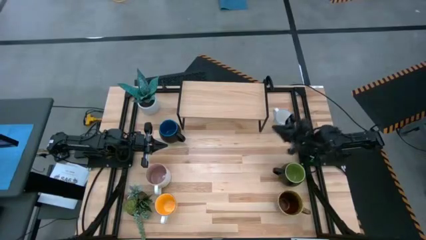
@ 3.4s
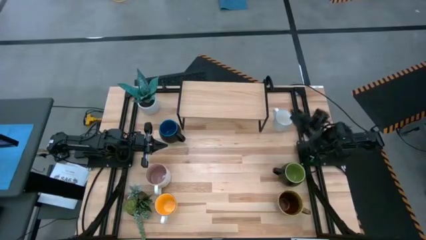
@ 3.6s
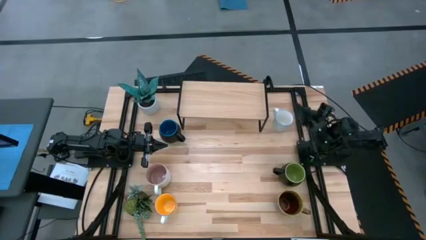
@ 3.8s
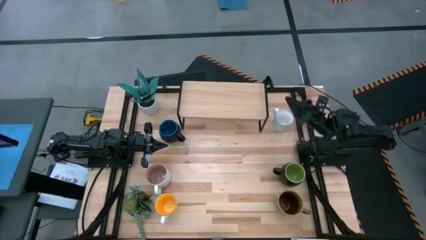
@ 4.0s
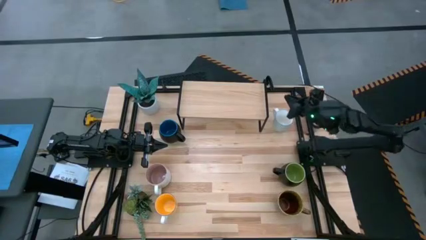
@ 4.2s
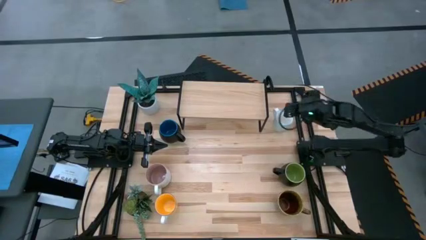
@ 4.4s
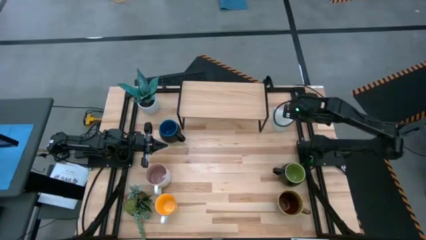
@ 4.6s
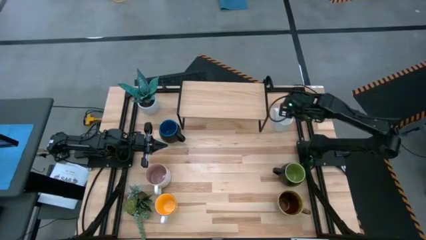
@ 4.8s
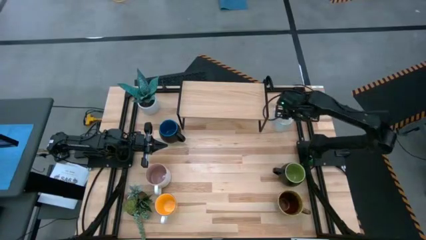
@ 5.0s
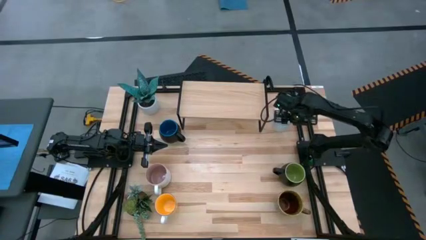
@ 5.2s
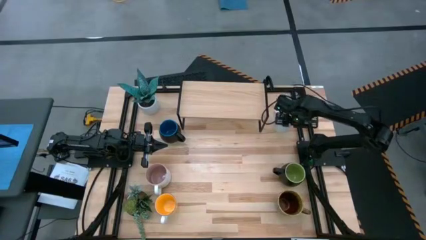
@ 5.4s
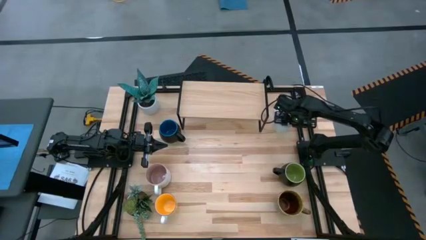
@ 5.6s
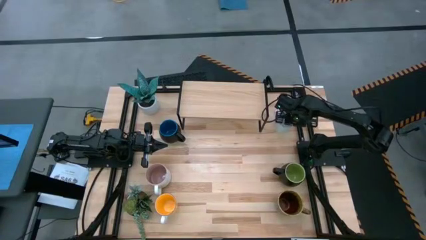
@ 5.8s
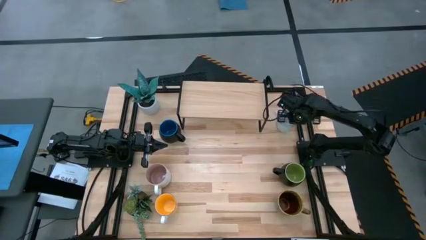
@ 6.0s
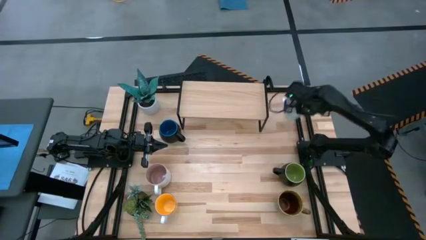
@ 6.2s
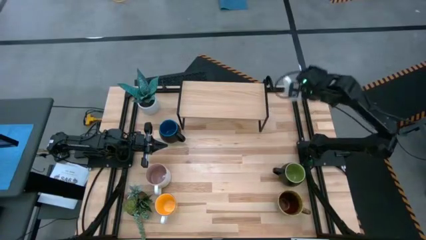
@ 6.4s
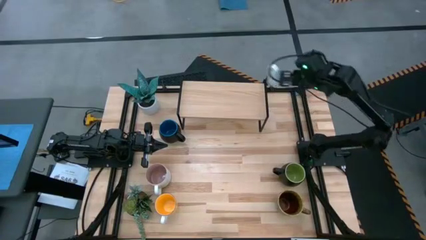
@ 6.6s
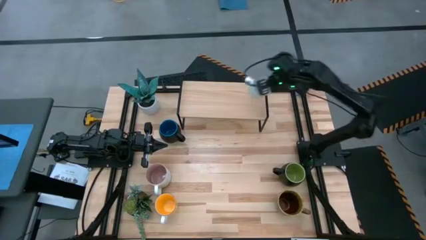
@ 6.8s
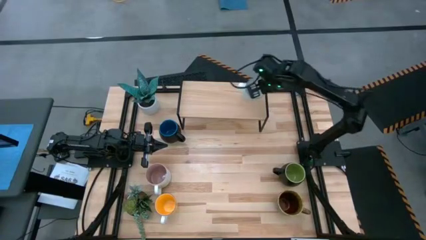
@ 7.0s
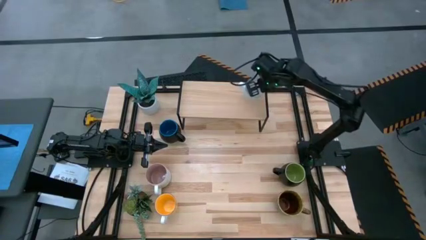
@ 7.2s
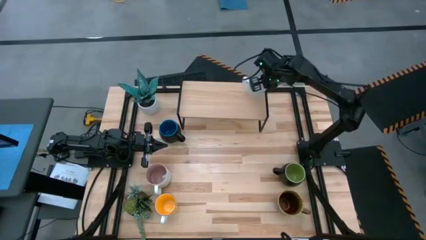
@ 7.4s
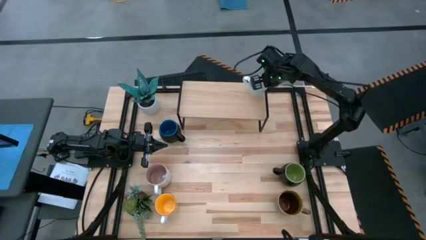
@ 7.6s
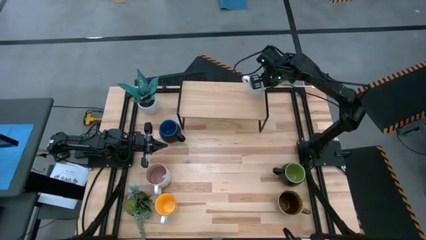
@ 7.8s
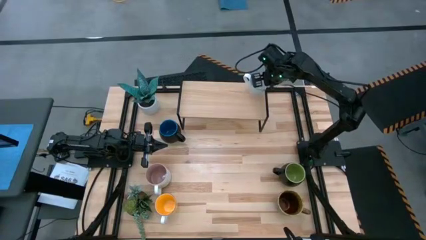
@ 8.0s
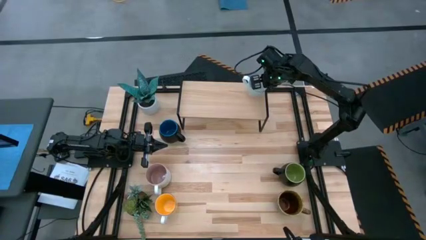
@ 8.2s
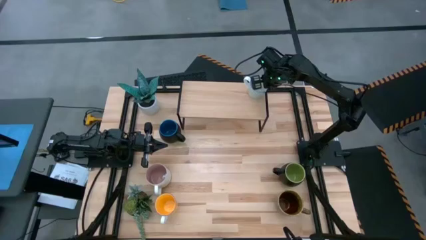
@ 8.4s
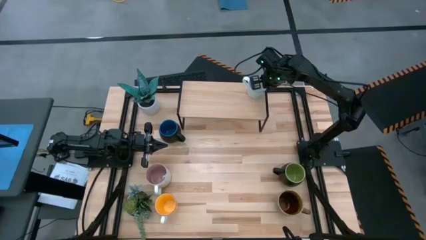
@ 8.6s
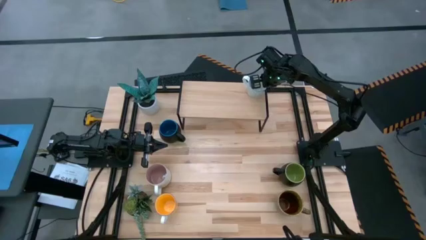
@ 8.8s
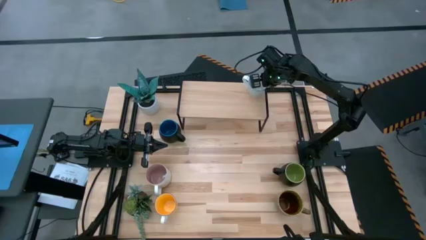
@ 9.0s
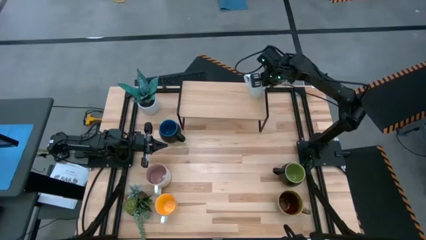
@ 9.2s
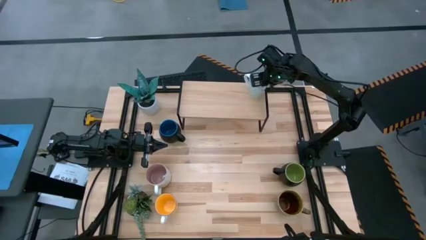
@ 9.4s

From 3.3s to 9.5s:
Task: Place coffee mugs
Put the white-blue interior mug on the shelf

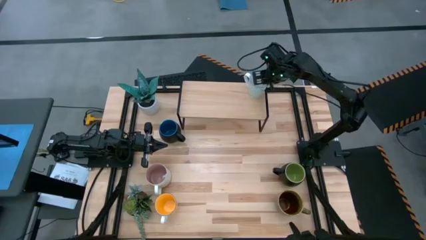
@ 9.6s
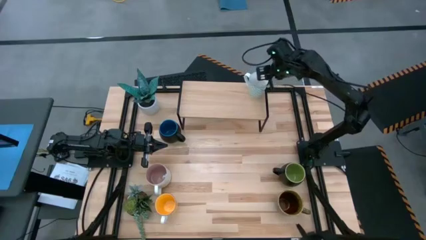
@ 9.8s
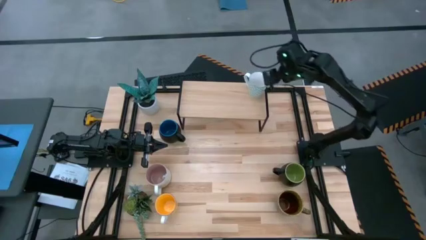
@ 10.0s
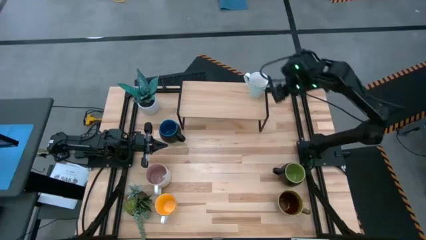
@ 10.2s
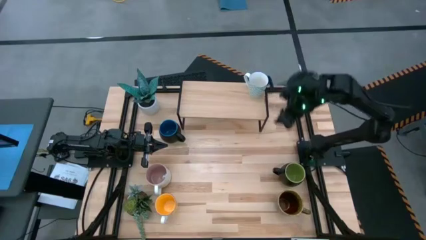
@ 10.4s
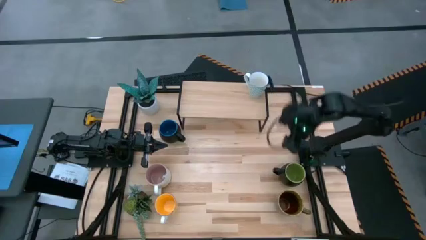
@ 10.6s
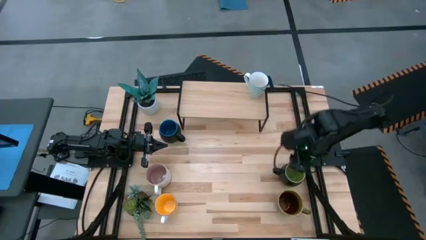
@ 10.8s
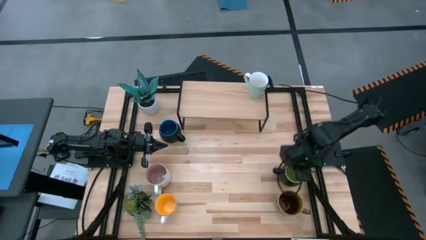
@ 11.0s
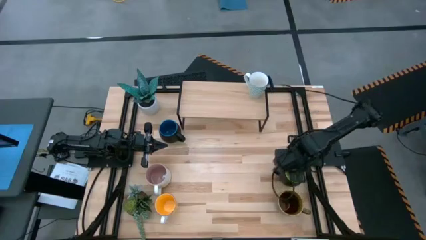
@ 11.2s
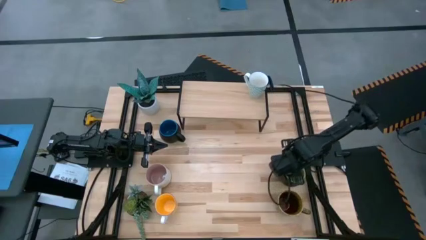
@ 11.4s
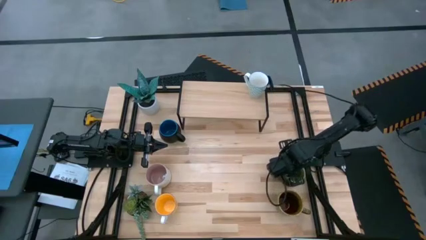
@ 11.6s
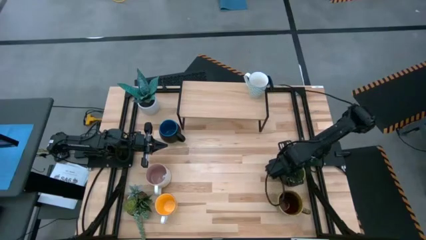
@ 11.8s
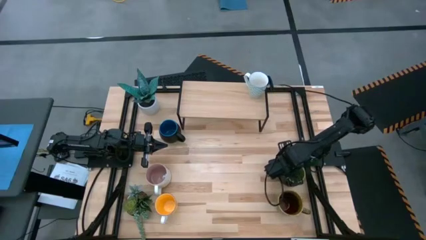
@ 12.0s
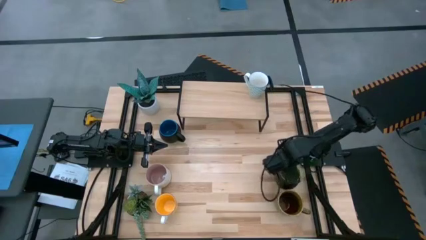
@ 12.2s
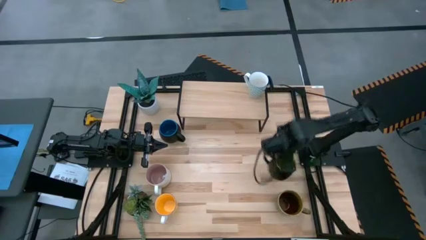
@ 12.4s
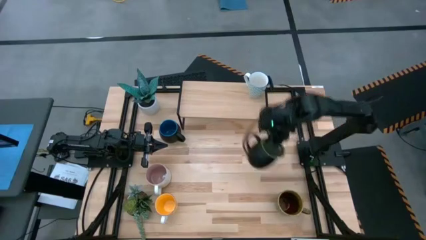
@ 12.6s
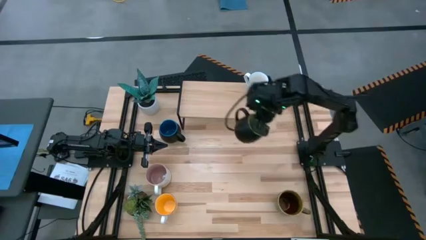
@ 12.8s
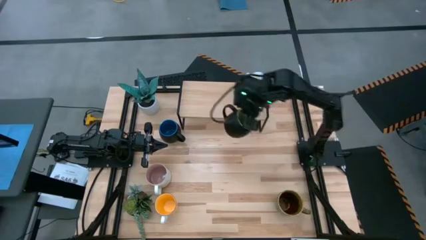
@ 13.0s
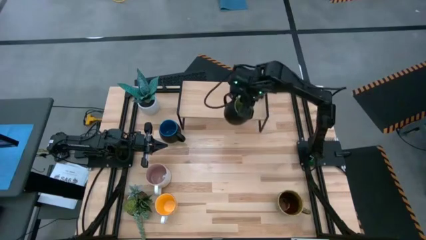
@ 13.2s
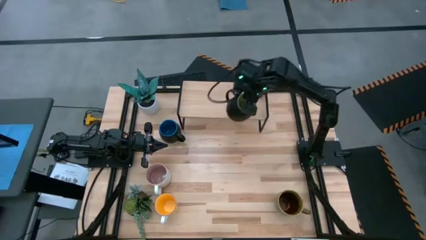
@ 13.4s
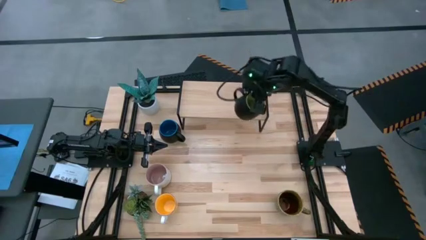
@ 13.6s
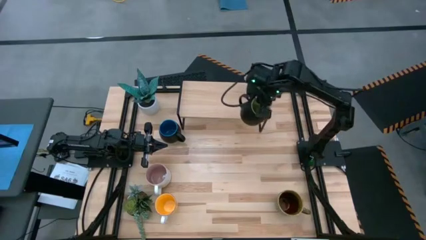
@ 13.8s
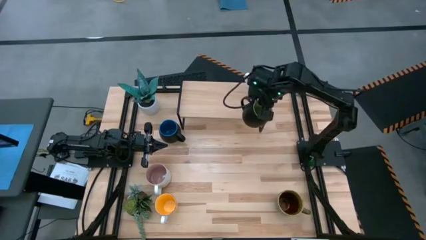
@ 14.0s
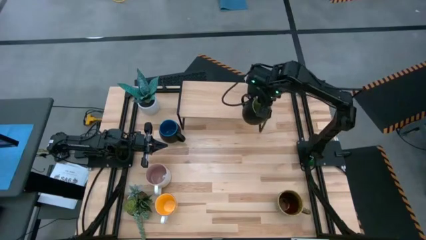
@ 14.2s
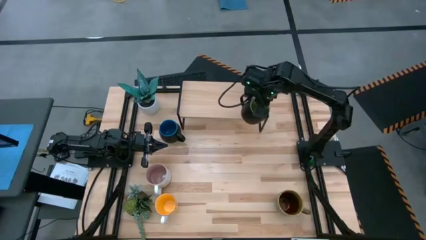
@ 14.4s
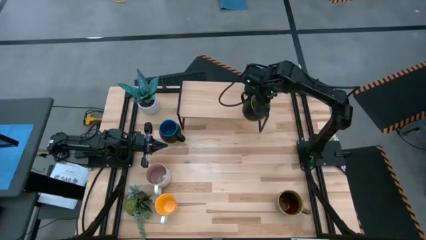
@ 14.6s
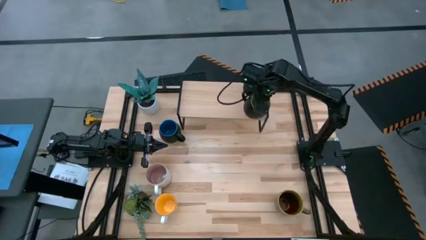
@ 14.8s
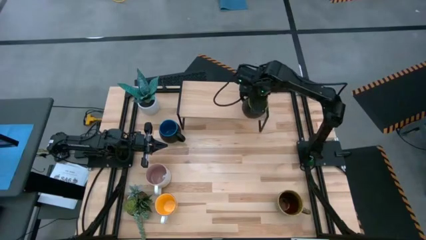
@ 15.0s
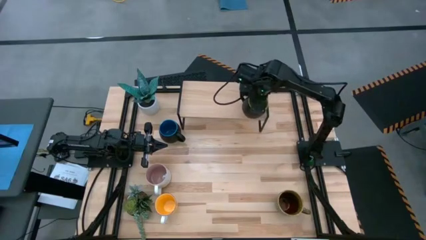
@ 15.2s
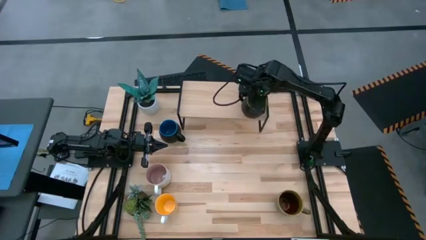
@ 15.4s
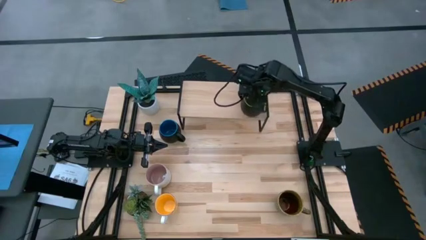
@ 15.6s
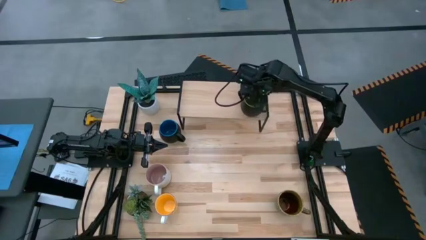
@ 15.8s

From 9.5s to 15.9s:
Put the black-green interior mug on the shelf

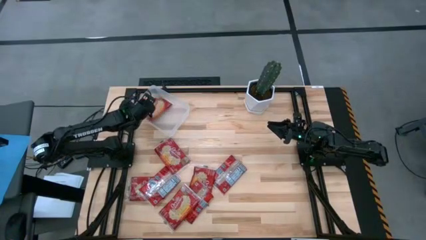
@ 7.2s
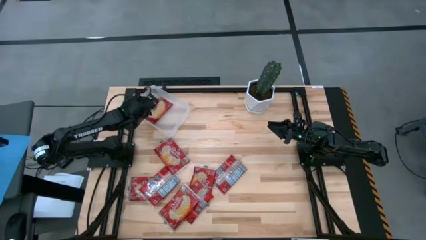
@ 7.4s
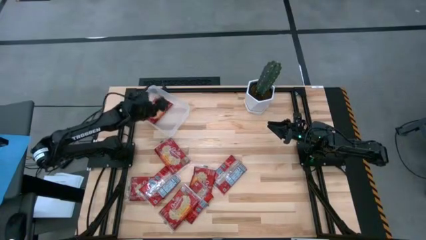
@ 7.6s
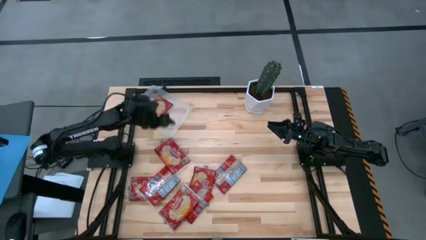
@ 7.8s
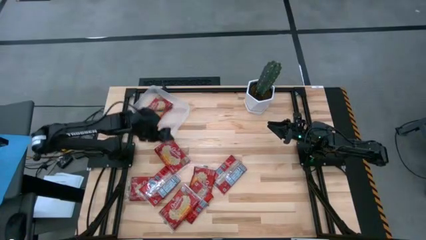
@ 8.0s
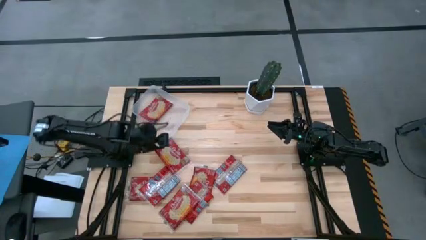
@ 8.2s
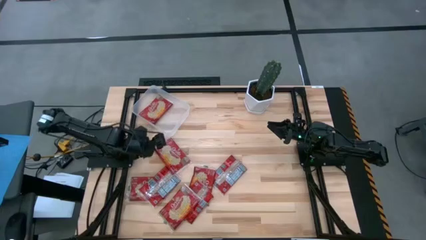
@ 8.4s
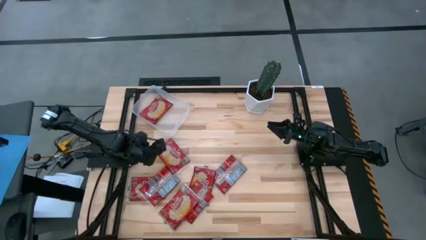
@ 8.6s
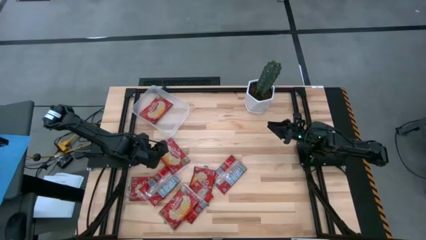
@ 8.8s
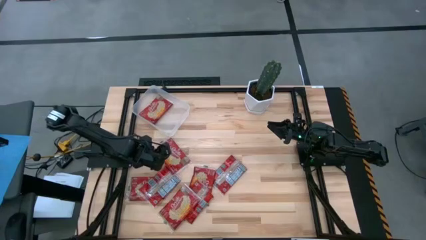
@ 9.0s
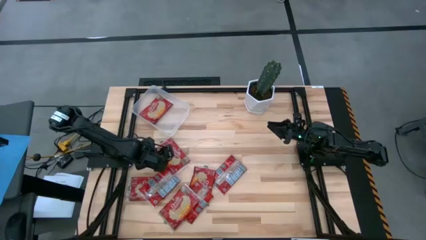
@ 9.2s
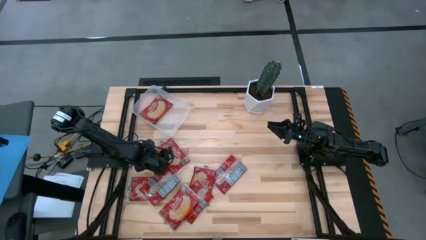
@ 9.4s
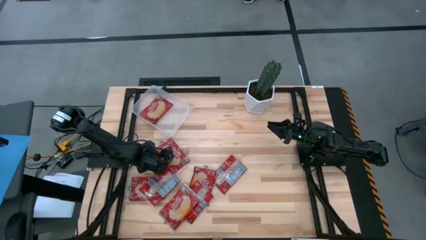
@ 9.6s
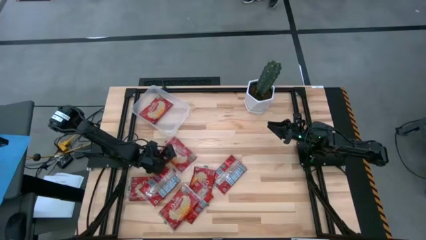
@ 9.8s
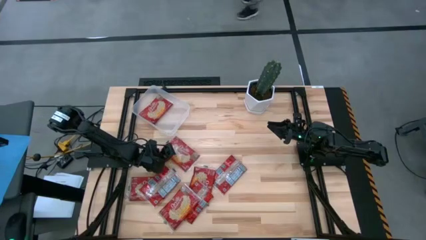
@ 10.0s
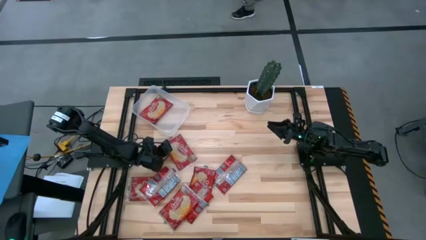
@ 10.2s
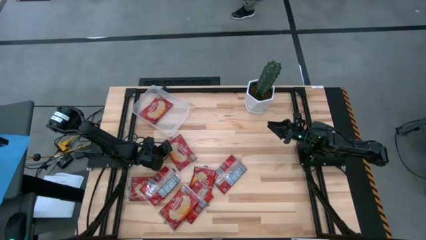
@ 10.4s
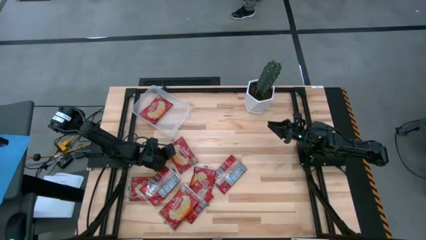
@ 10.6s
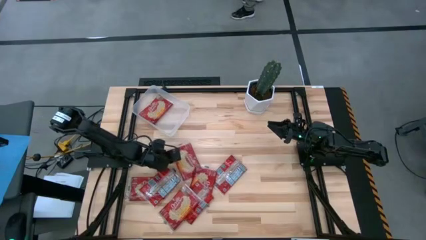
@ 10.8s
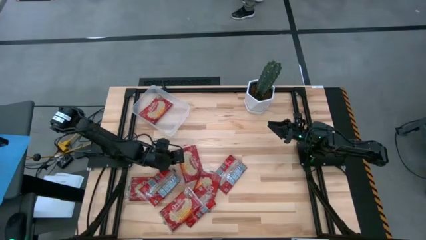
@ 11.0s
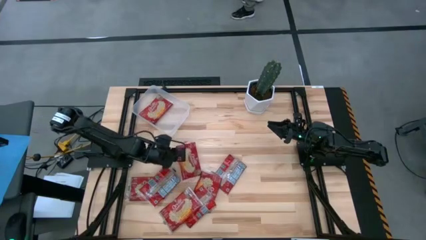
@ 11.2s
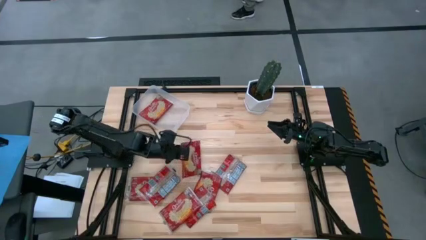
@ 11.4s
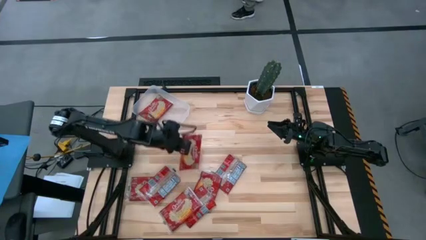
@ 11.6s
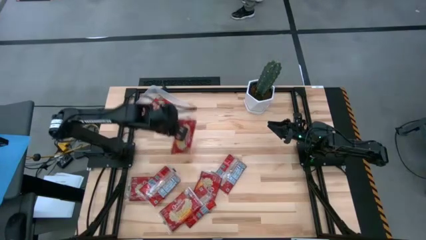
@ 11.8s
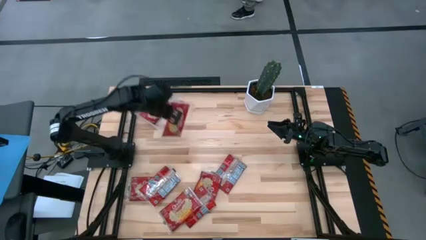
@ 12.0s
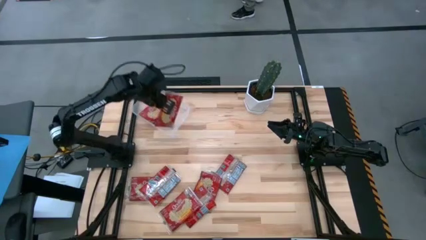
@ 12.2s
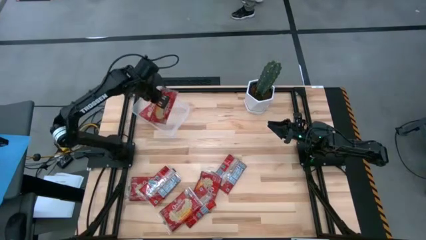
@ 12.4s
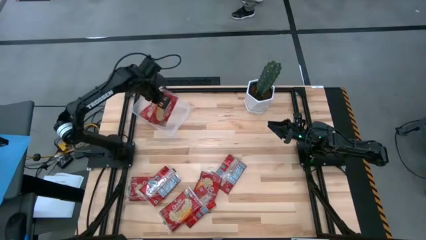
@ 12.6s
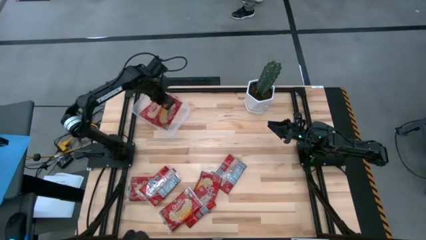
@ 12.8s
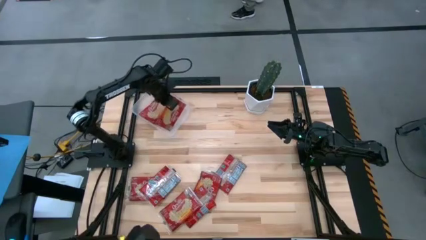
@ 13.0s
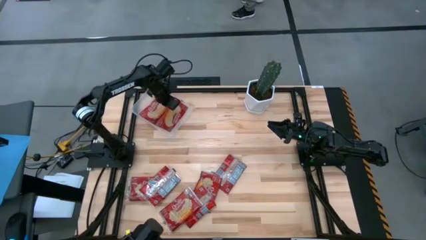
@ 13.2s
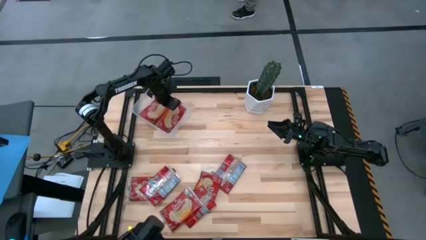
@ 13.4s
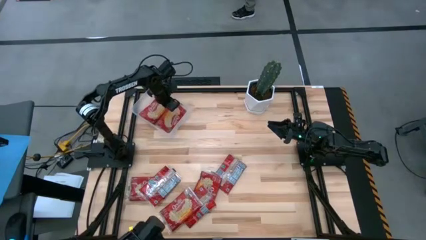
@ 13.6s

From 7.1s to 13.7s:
Task: Sort popcorn bags into baskets
Put the red popcorn bag into the transparent bin
